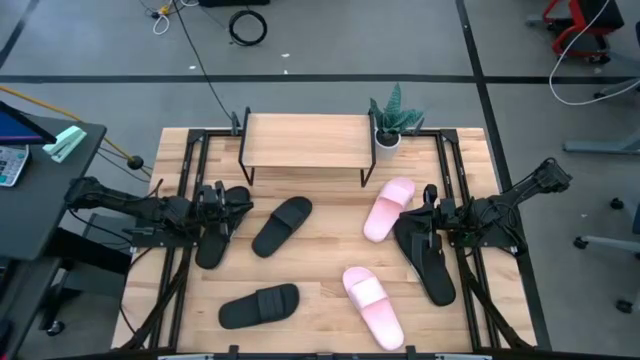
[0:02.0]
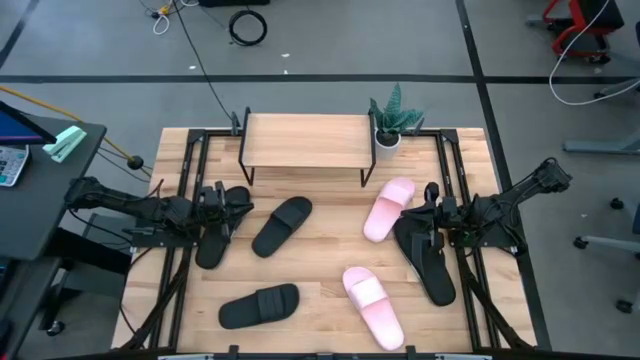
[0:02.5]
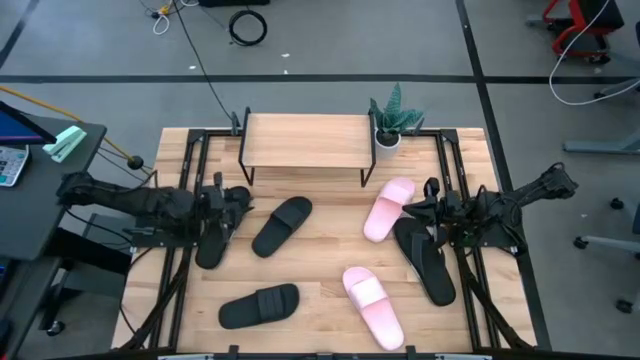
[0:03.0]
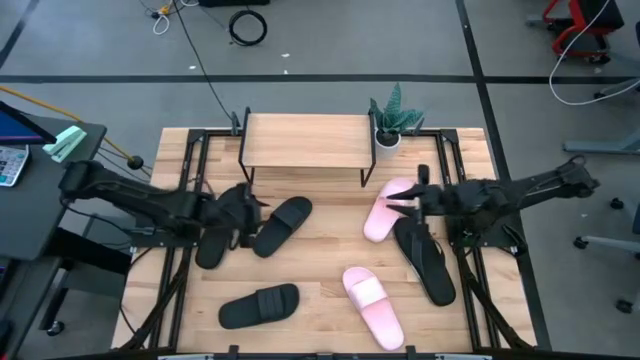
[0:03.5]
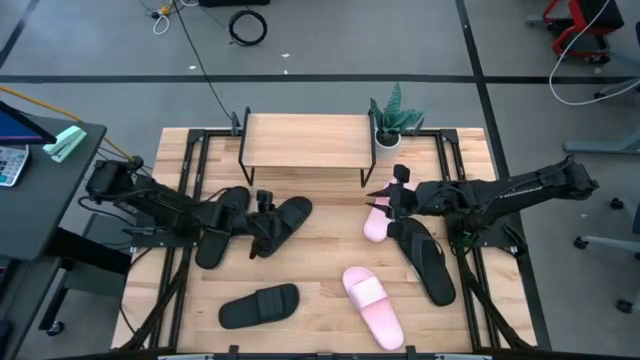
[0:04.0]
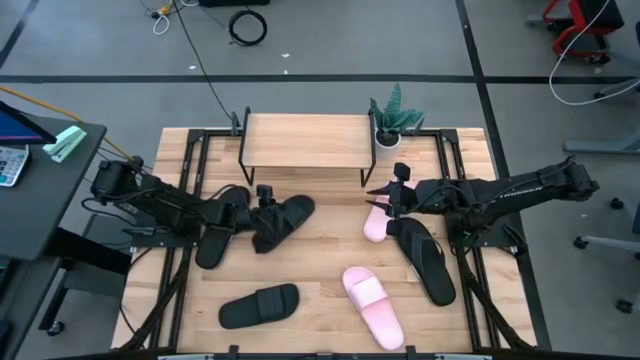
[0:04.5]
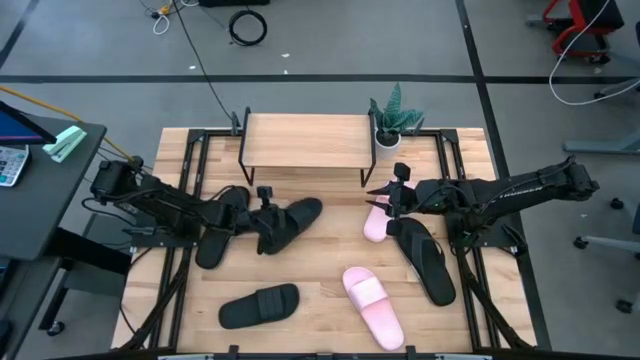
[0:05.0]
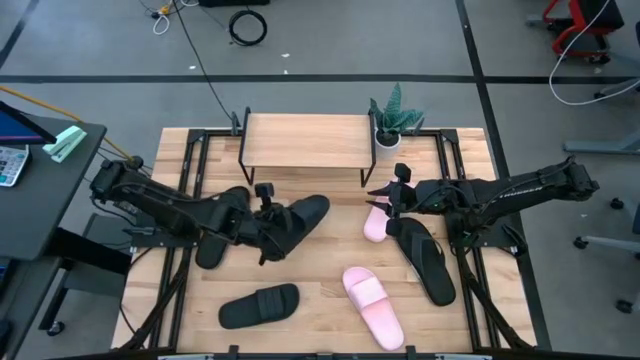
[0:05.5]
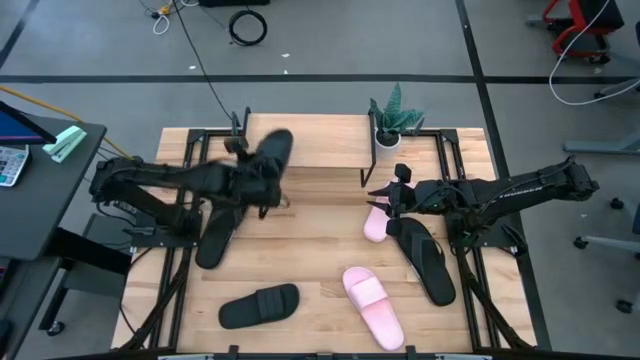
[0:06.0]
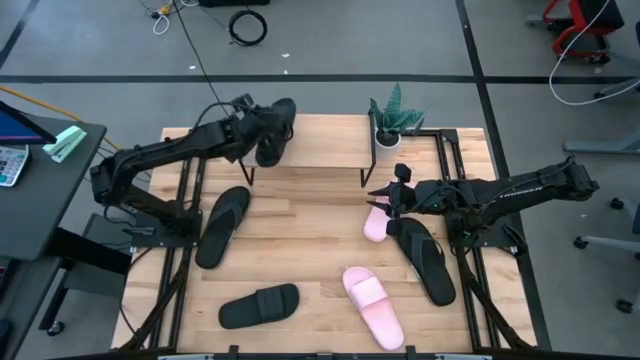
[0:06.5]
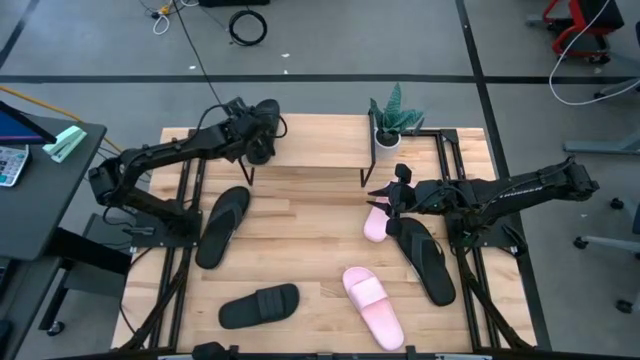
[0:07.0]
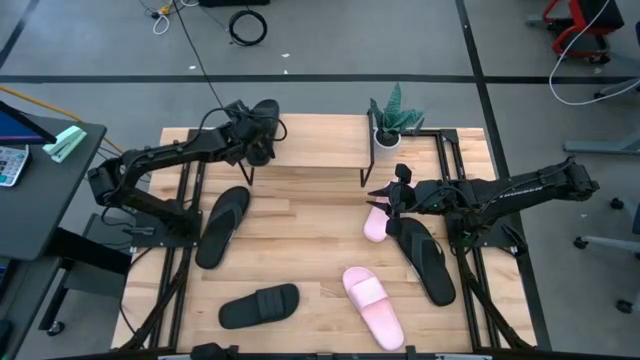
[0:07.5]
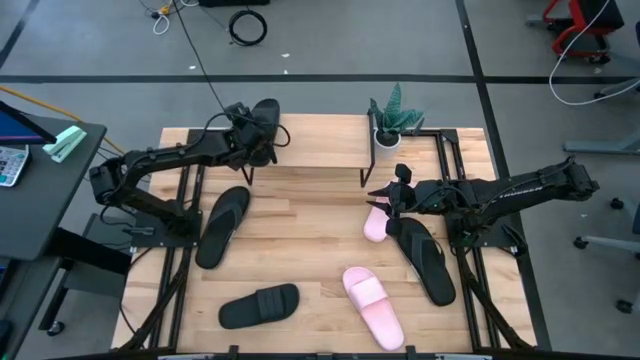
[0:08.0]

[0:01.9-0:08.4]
Task: Pick and place slides into the shelf
Put the top black slides on the shelf

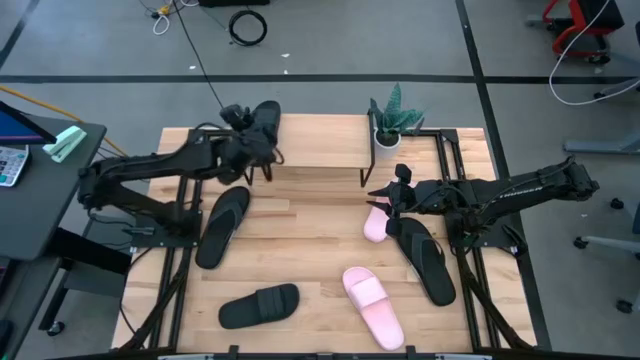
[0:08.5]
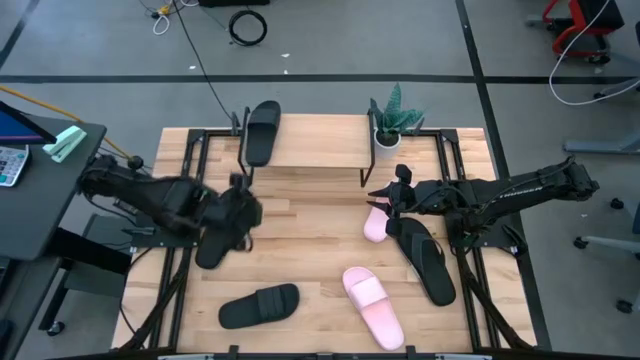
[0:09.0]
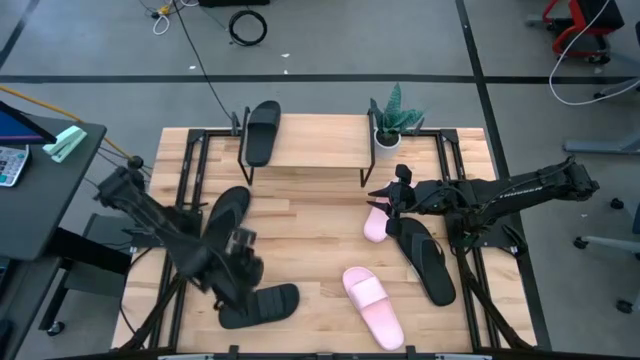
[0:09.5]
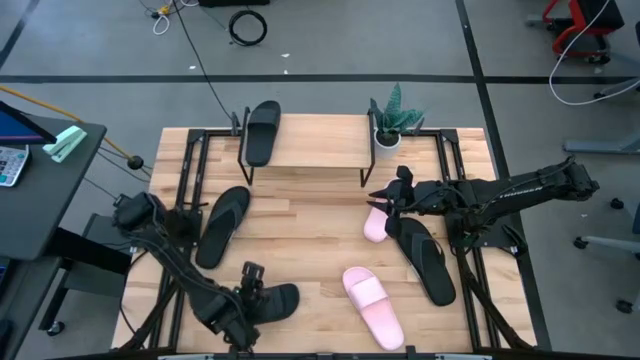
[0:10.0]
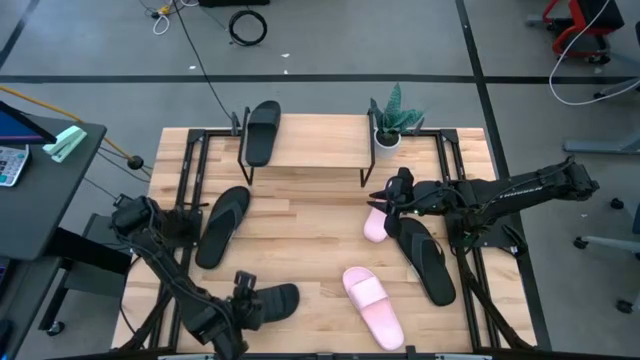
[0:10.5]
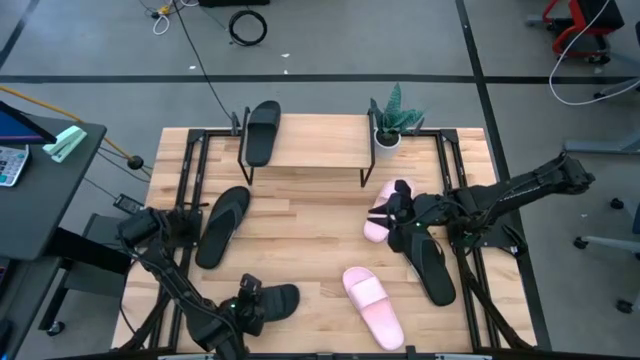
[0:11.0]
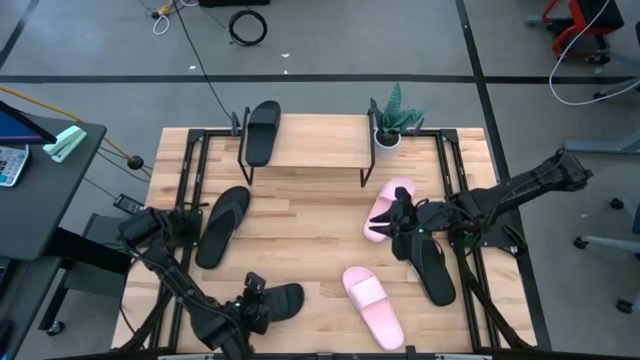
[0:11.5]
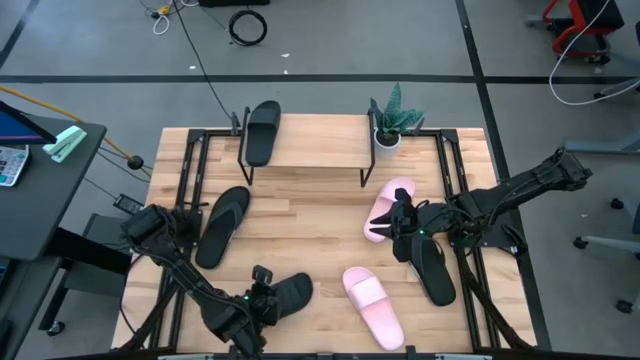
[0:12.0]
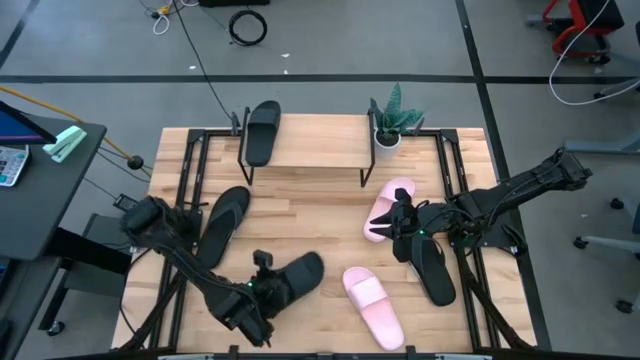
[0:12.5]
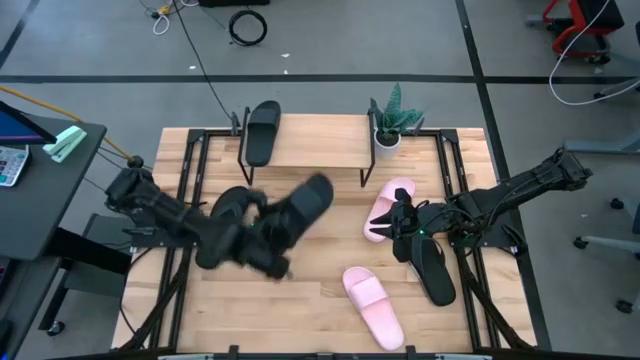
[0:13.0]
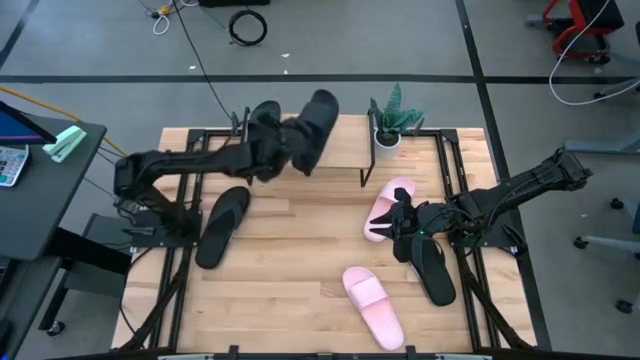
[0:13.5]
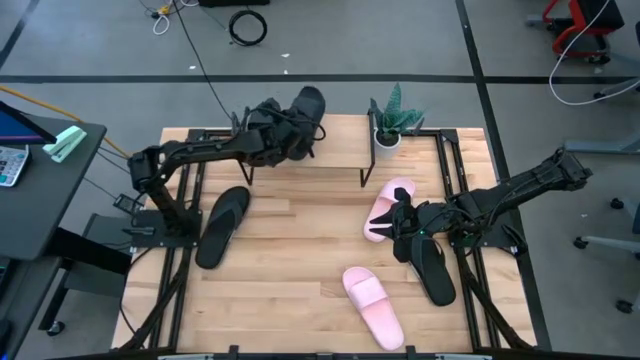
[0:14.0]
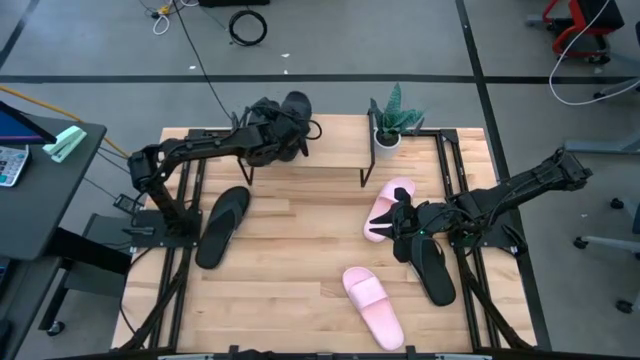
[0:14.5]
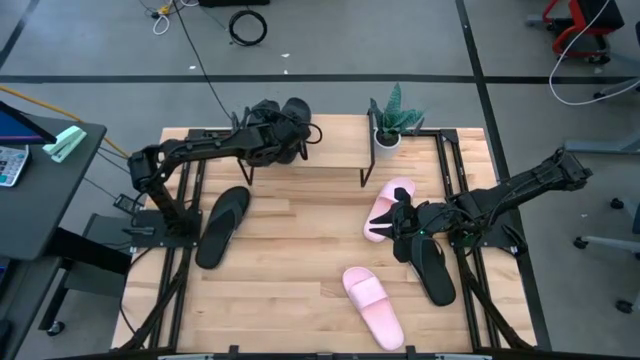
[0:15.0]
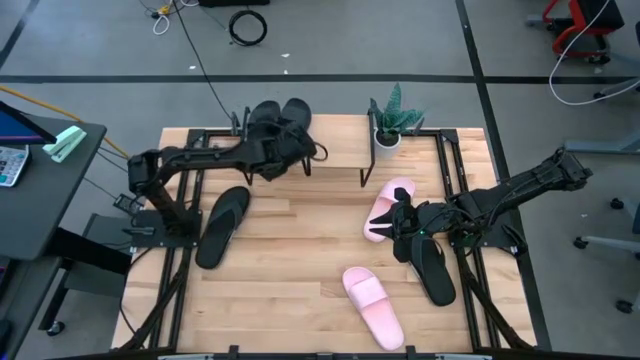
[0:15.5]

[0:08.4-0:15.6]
Put the black slides on the shelf

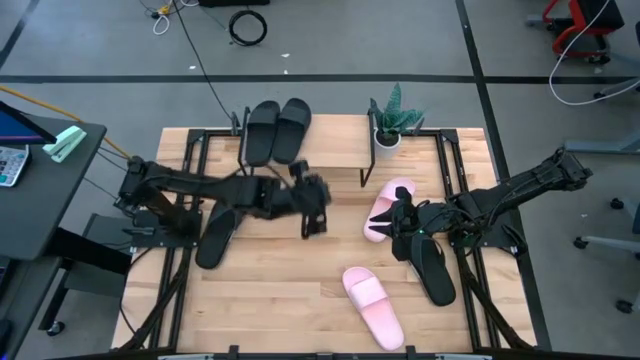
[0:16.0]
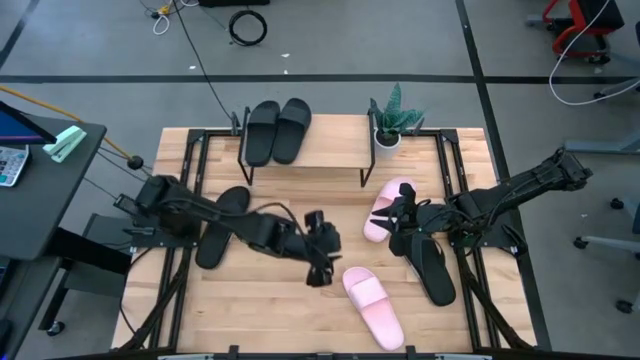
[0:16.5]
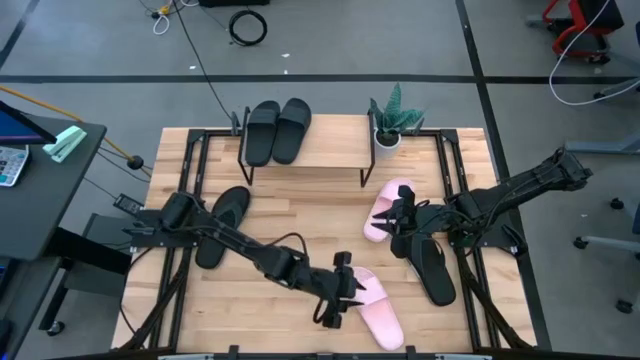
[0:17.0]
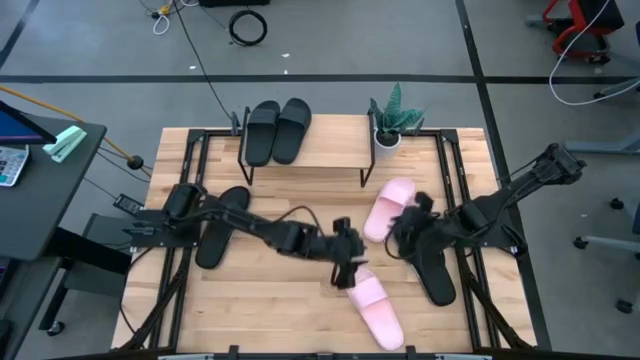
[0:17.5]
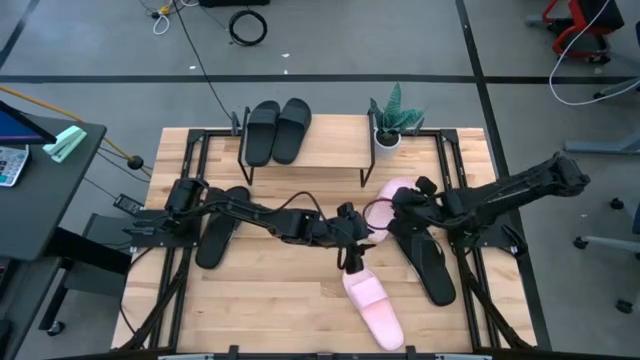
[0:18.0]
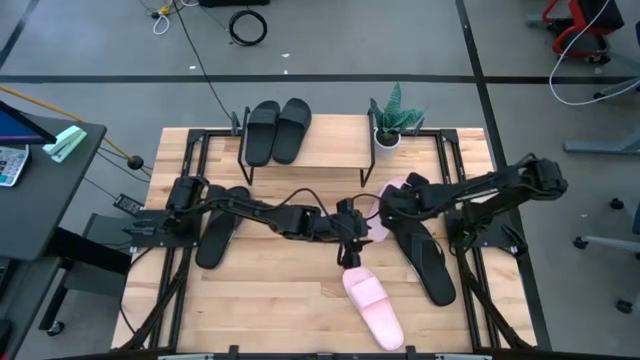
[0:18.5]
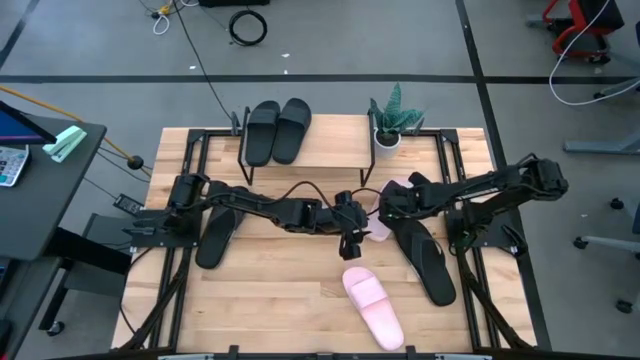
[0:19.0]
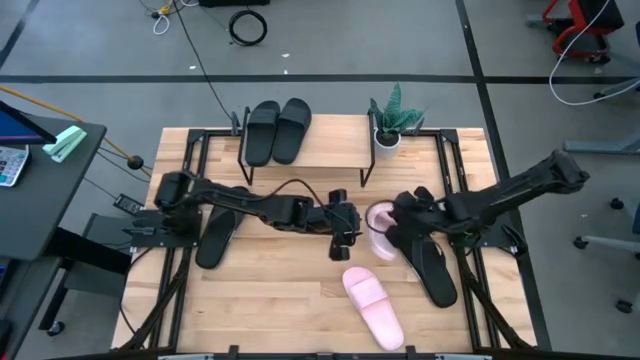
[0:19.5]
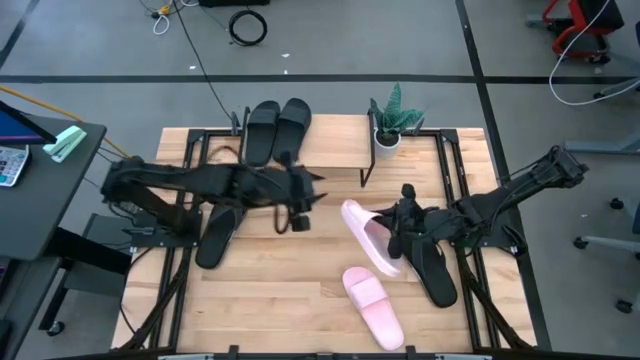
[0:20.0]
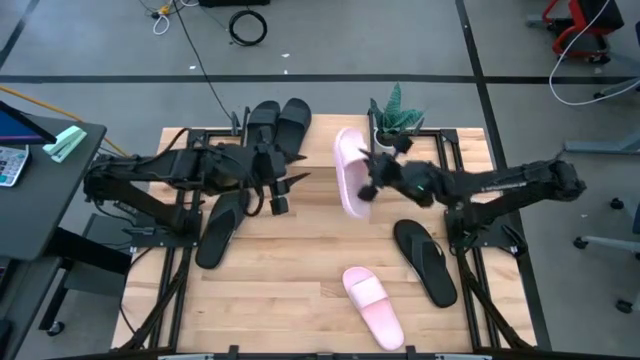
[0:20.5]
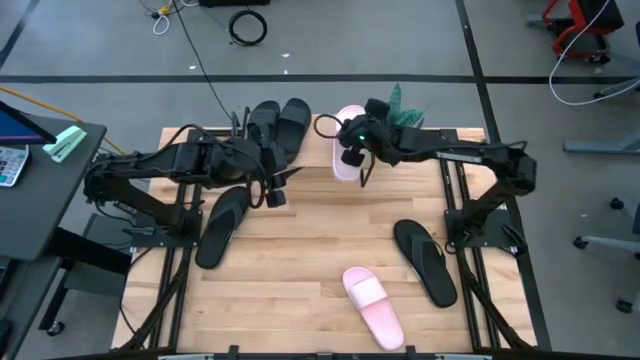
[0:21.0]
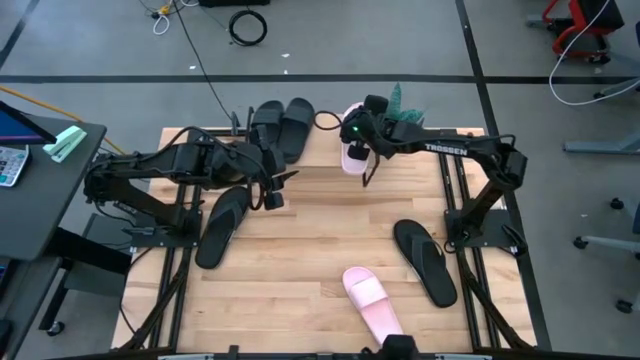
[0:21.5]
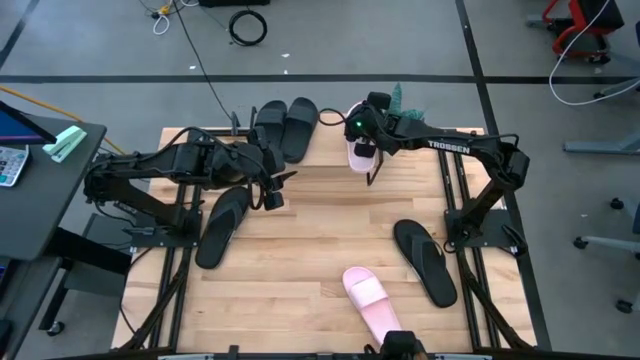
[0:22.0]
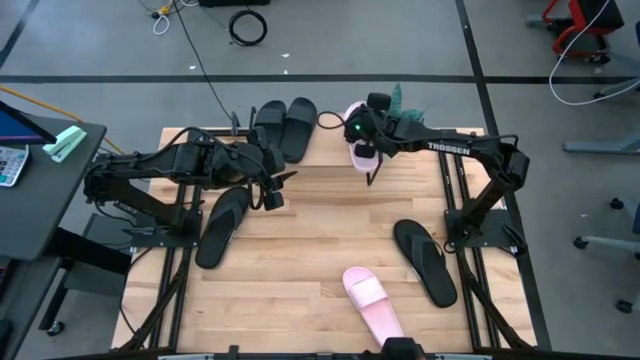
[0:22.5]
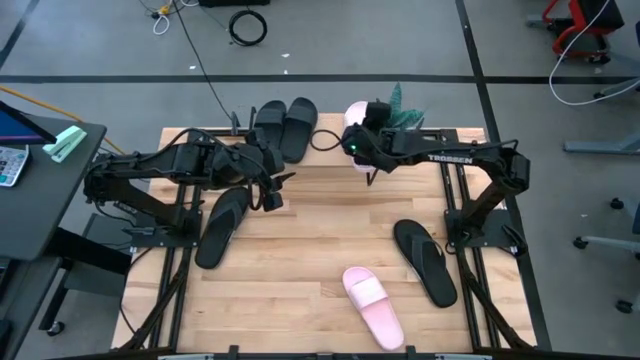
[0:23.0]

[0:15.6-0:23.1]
Put the top pink slides on the shelf
